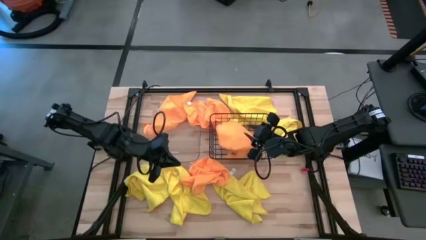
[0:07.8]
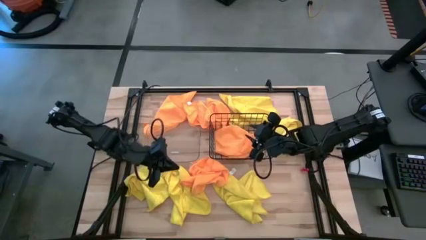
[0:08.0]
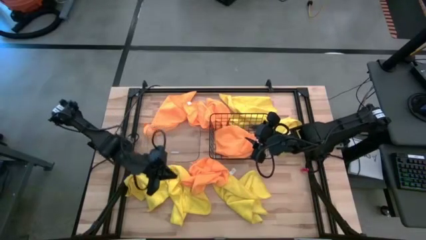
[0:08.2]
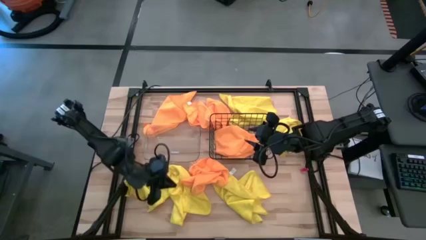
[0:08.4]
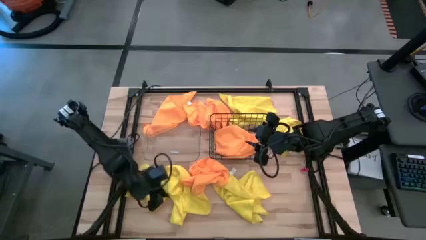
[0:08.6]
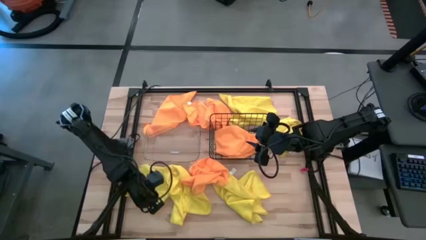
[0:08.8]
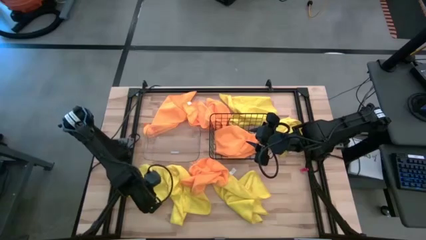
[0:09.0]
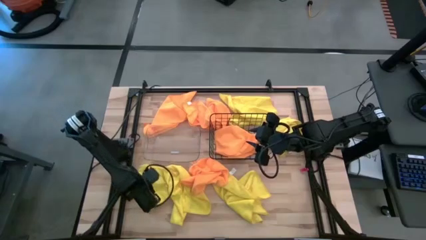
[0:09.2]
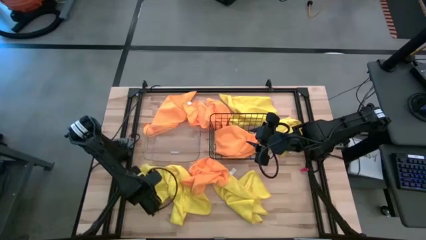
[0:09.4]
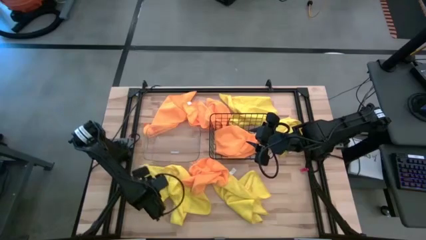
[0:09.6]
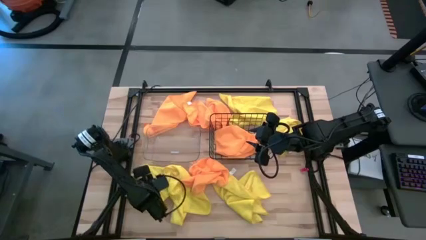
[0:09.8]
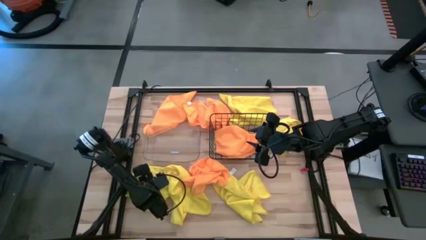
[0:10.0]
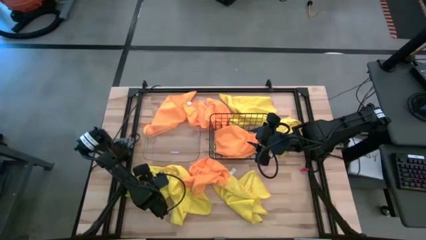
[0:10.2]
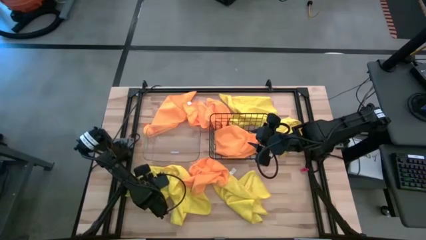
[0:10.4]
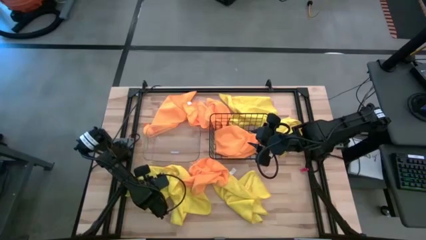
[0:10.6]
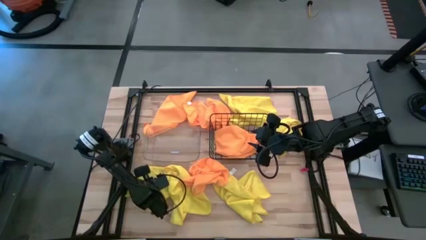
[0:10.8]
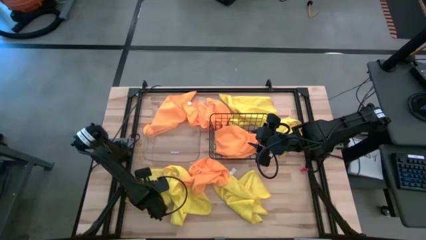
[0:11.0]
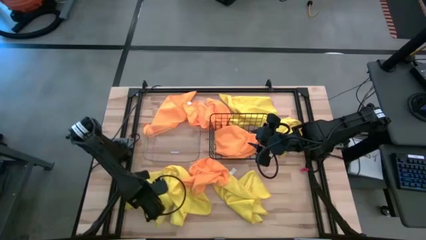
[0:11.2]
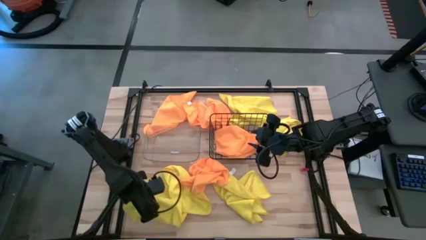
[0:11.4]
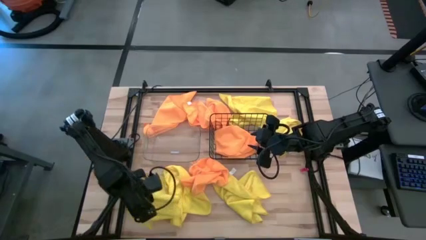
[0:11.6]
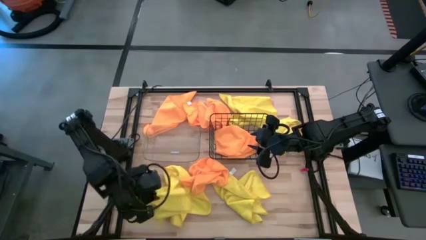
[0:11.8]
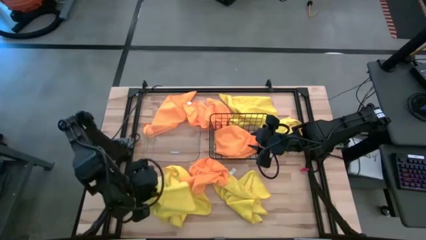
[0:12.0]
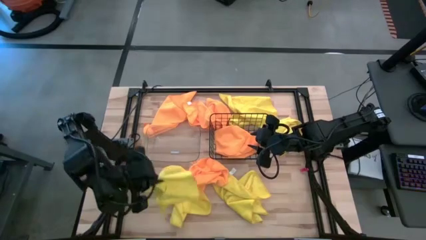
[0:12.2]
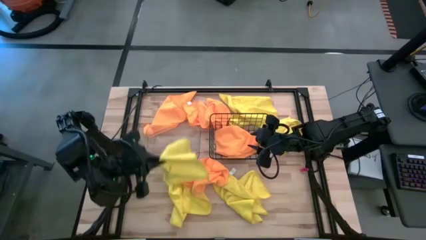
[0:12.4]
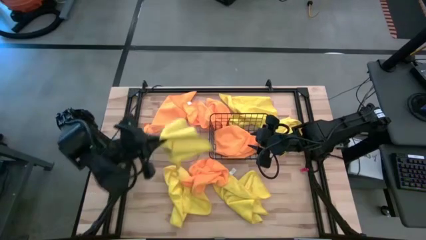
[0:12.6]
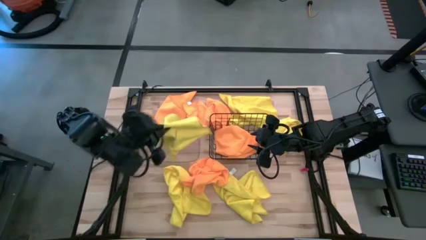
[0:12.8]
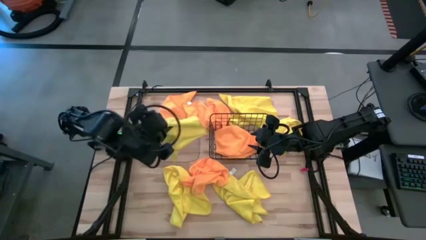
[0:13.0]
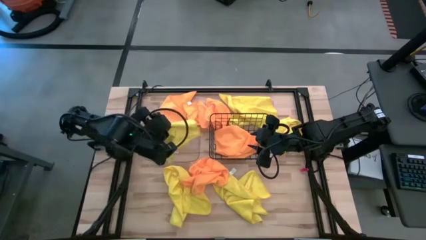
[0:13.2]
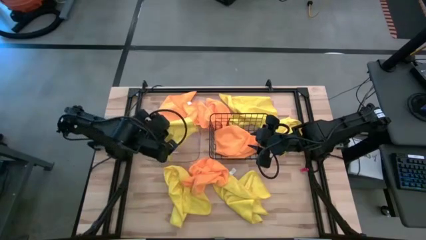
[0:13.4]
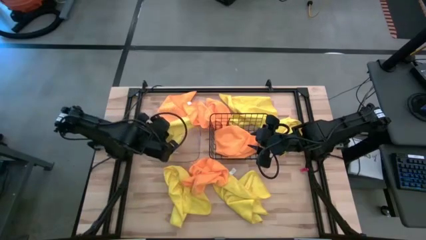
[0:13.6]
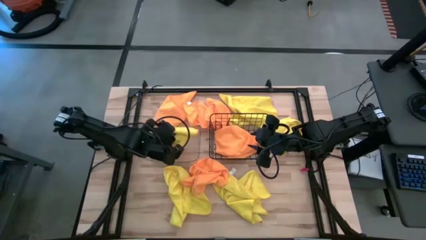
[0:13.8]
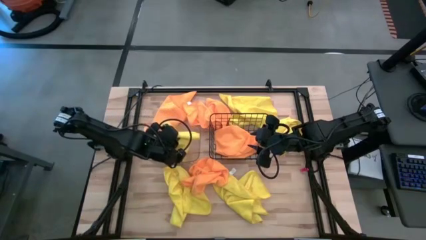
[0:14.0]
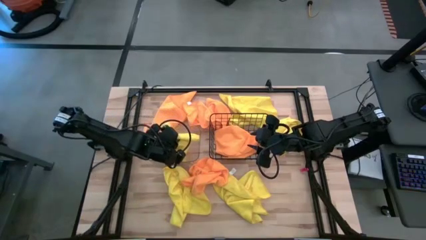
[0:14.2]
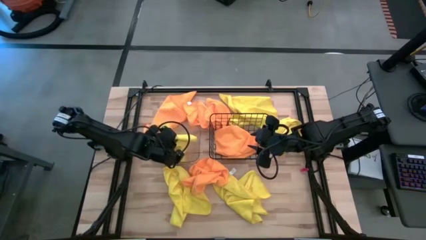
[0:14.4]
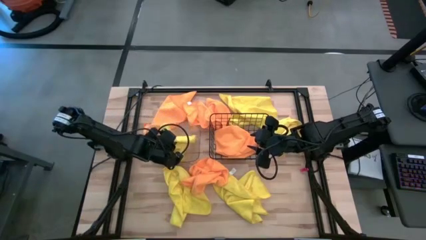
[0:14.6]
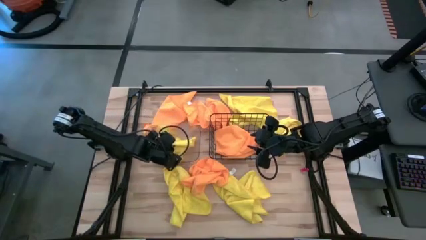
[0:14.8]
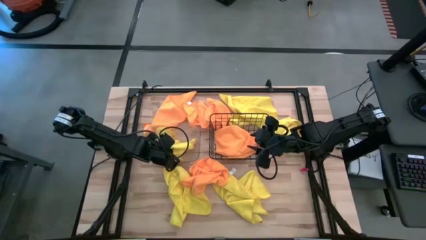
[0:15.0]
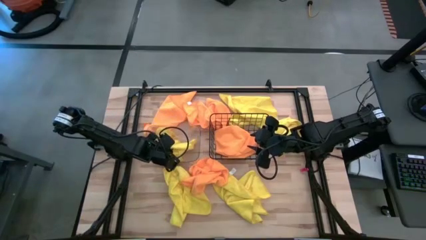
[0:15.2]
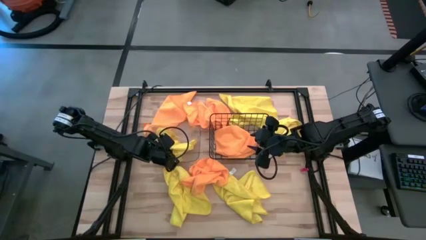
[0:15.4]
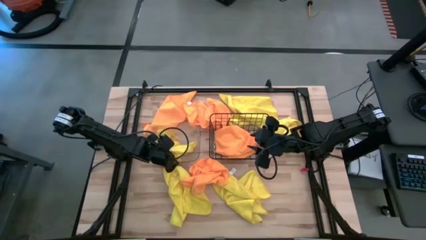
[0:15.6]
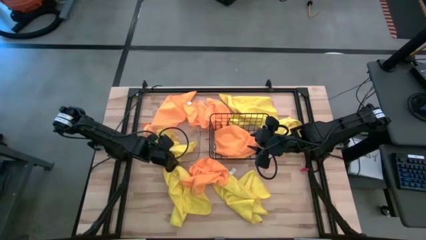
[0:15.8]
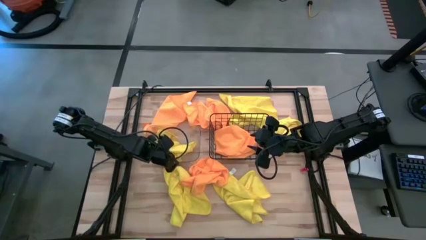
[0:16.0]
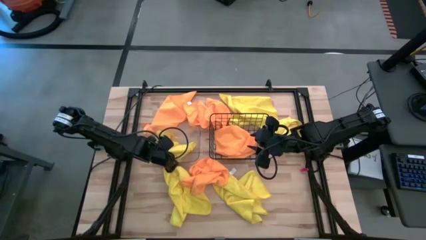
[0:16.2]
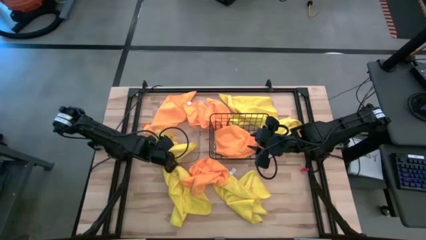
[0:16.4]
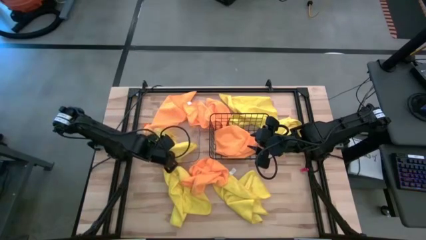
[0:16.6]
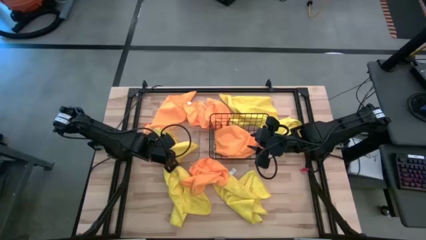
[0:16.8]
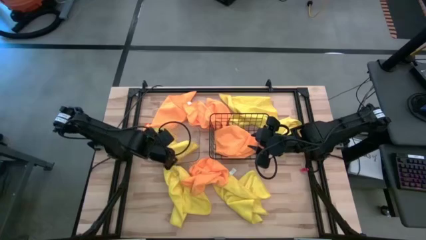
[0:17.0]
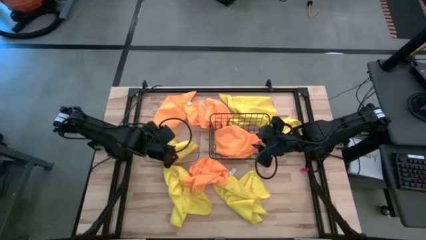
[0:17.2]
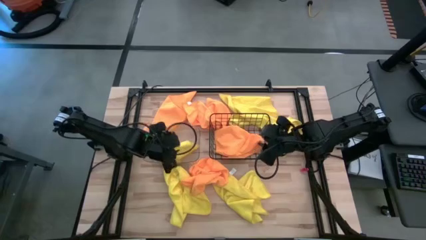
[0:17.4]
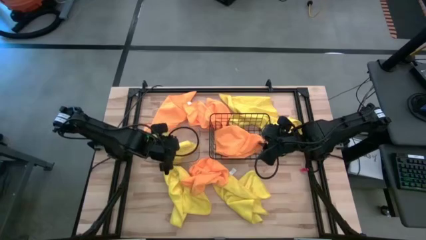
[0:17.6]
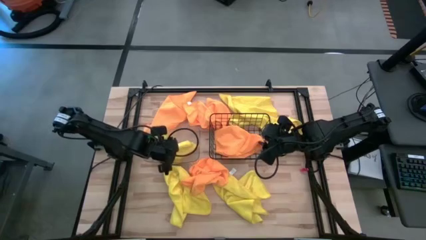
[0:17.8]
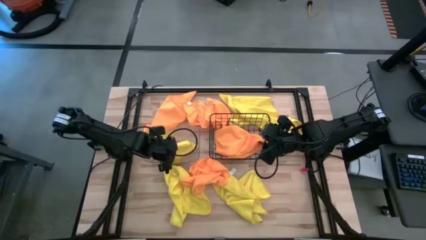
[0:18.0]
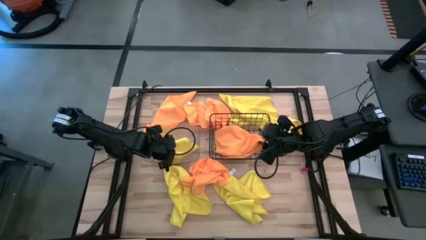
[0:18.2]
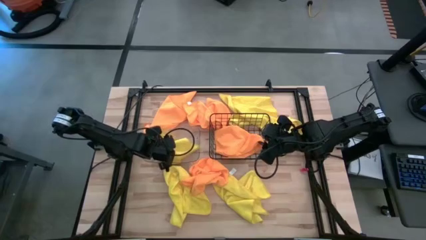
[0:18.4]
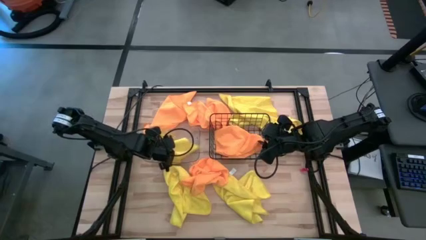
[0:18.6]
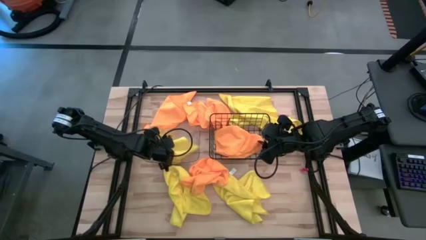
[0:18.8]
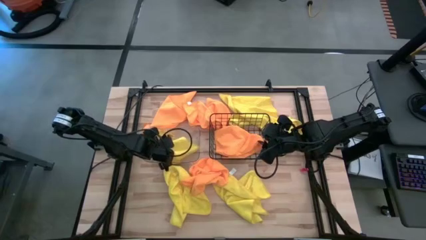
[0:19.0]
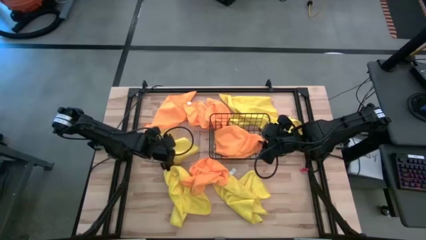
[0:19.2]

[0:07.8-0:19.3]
Task: Sort microfiber towel by color & place in baskets
Put the yellow towel into the transparent bin
